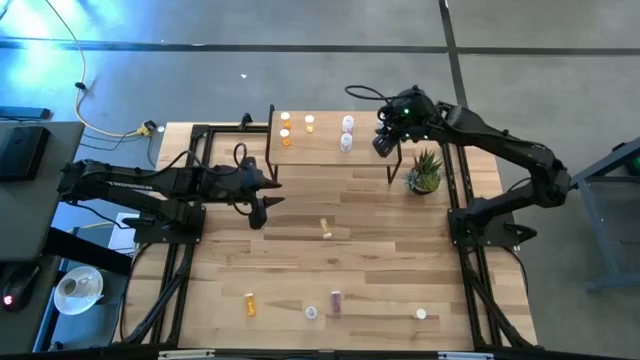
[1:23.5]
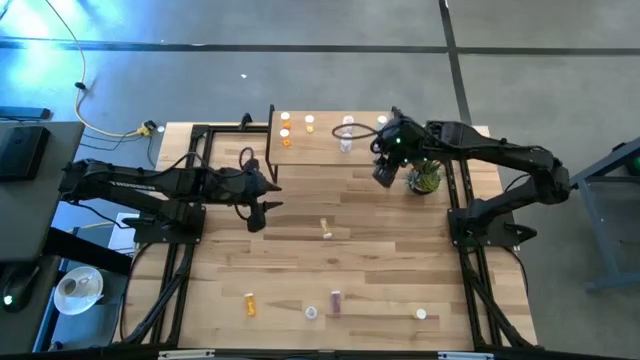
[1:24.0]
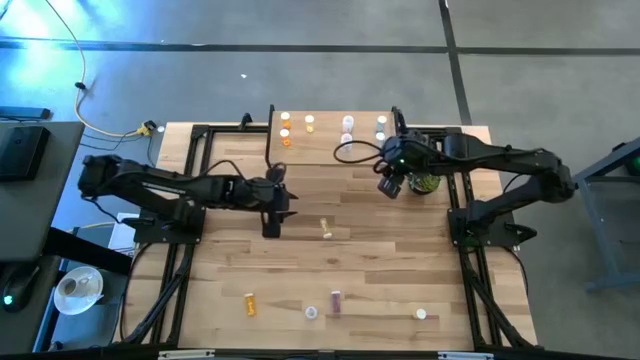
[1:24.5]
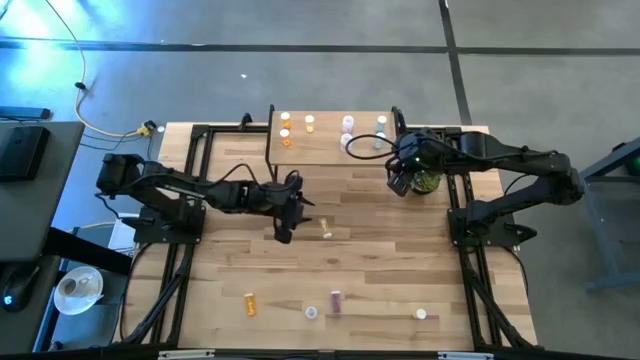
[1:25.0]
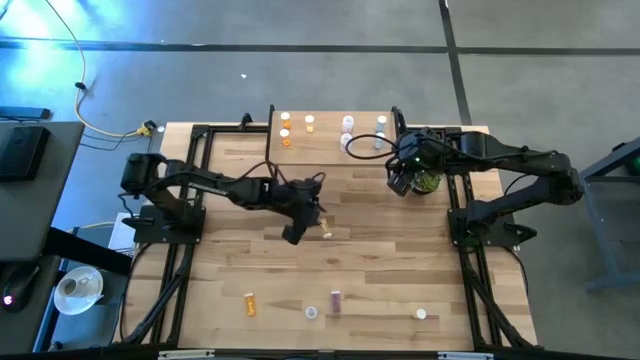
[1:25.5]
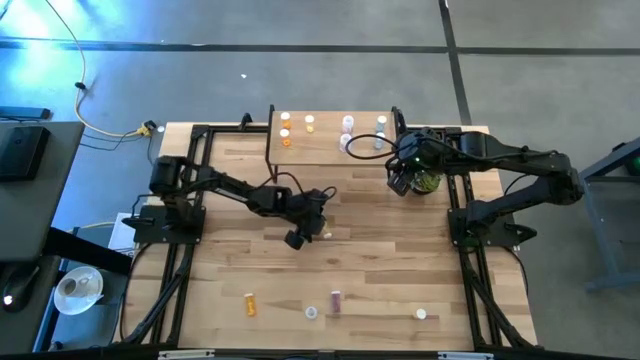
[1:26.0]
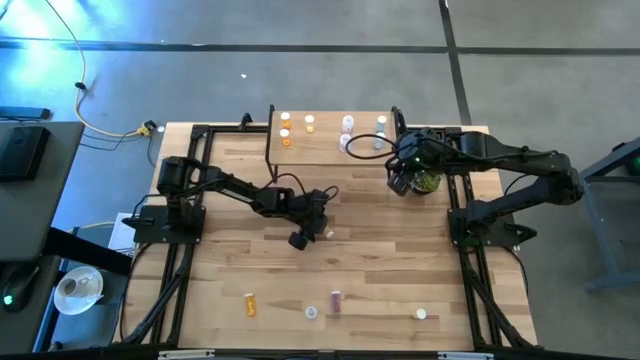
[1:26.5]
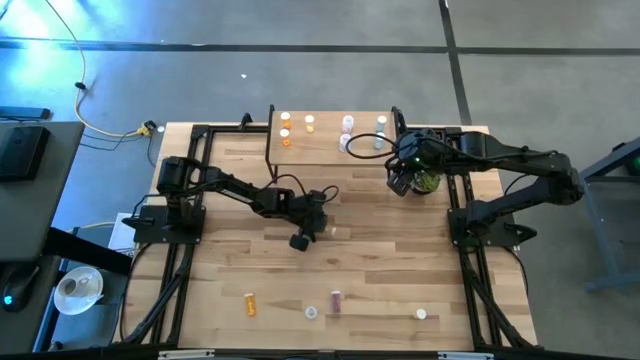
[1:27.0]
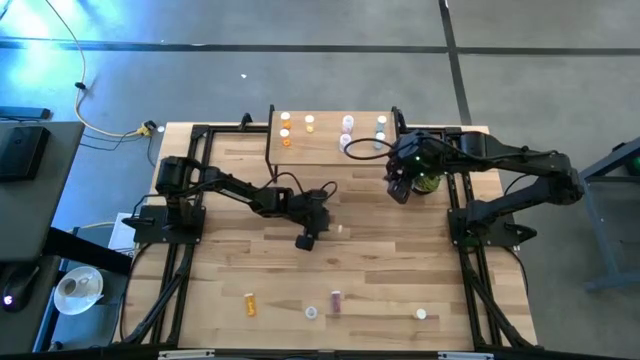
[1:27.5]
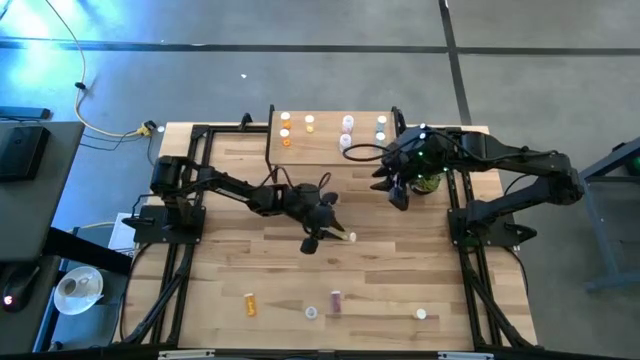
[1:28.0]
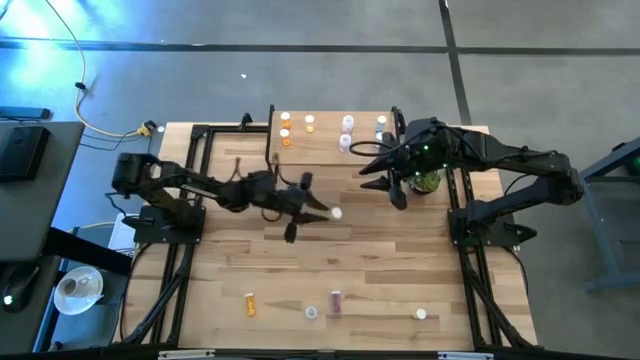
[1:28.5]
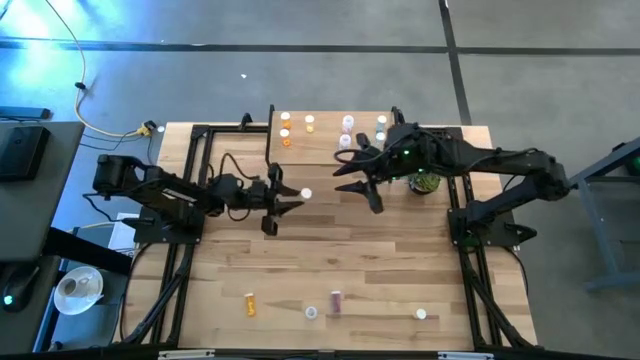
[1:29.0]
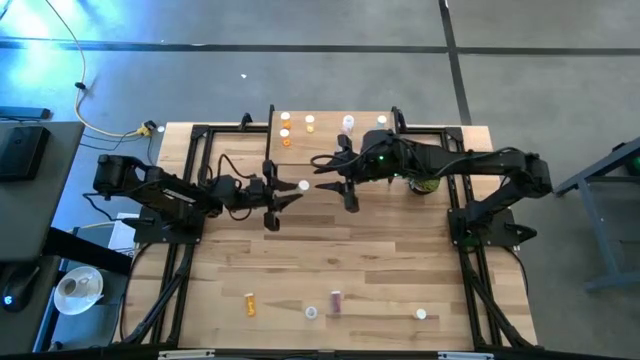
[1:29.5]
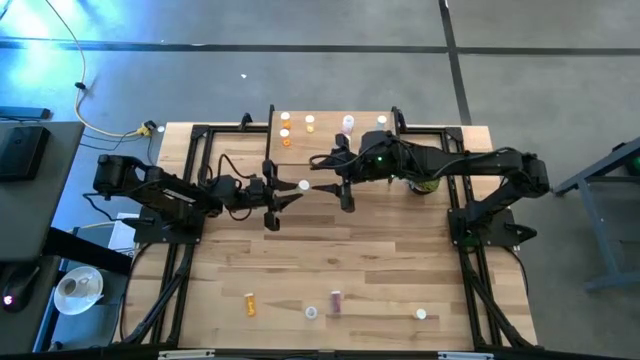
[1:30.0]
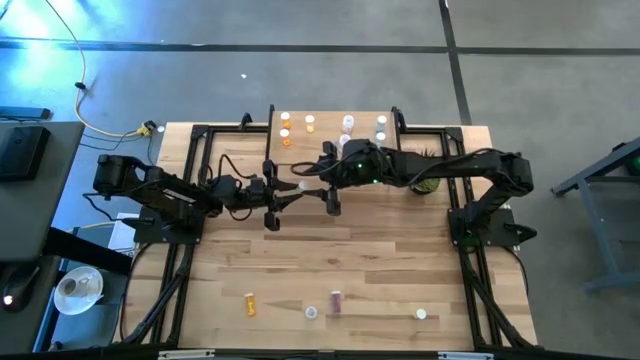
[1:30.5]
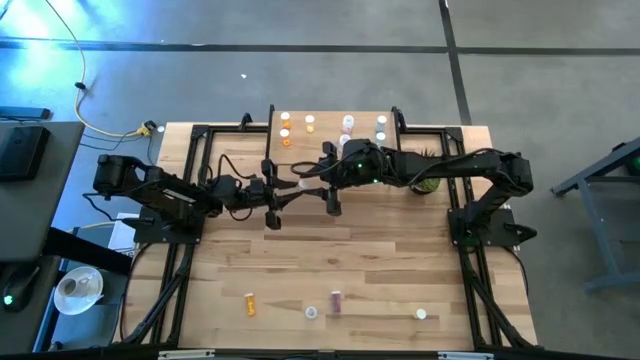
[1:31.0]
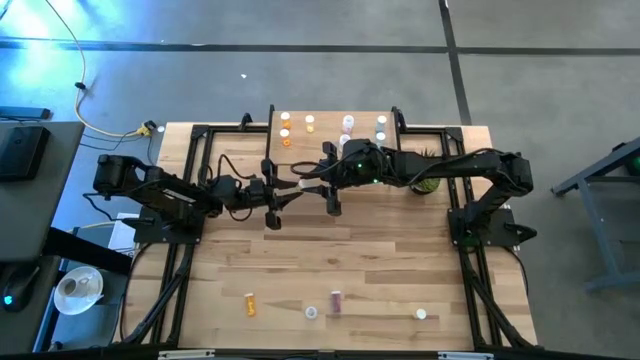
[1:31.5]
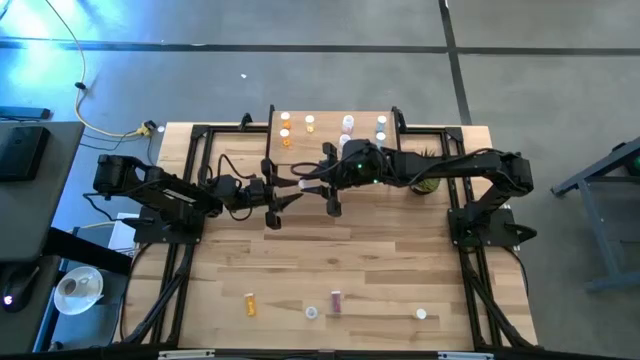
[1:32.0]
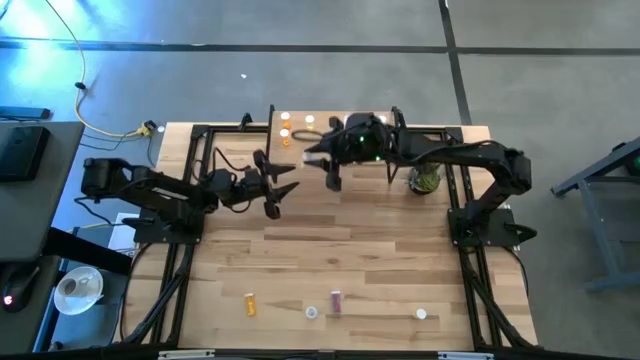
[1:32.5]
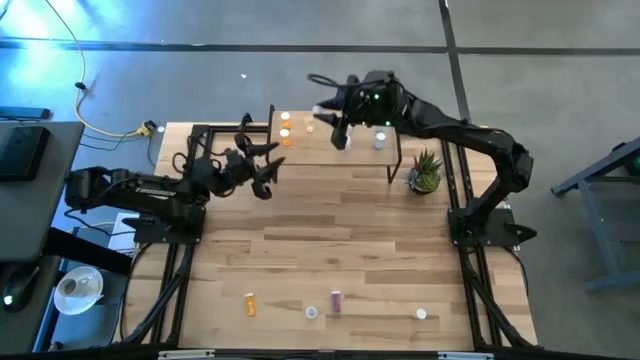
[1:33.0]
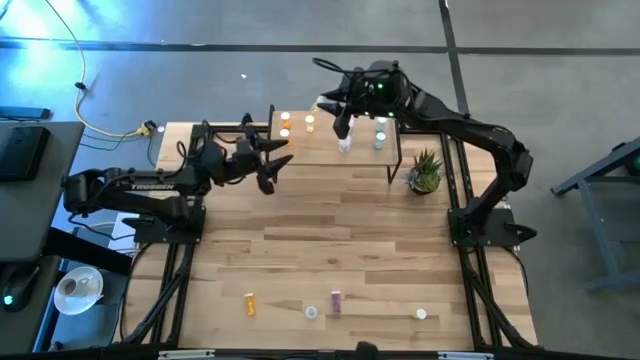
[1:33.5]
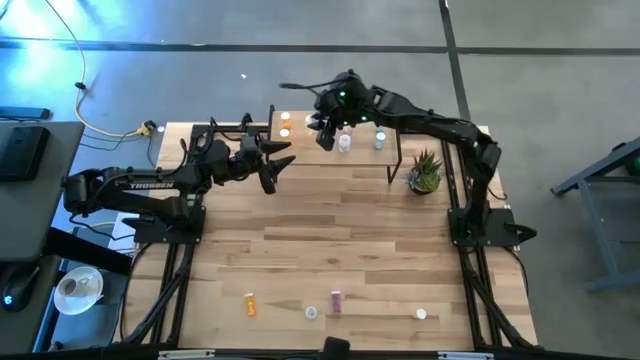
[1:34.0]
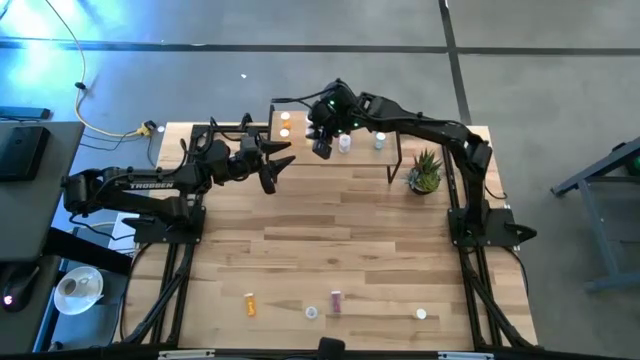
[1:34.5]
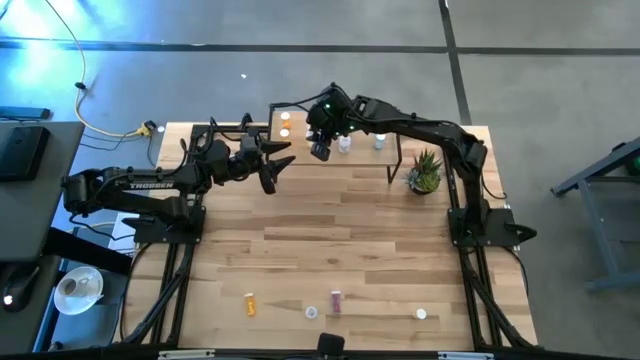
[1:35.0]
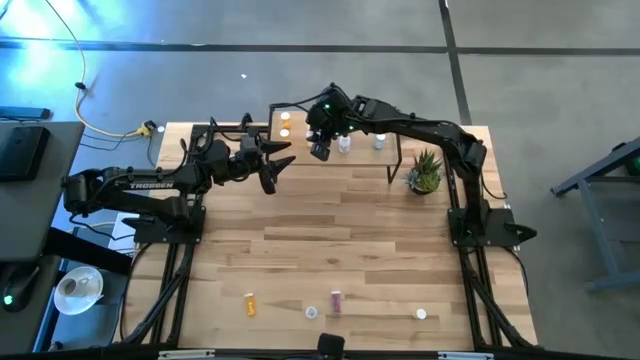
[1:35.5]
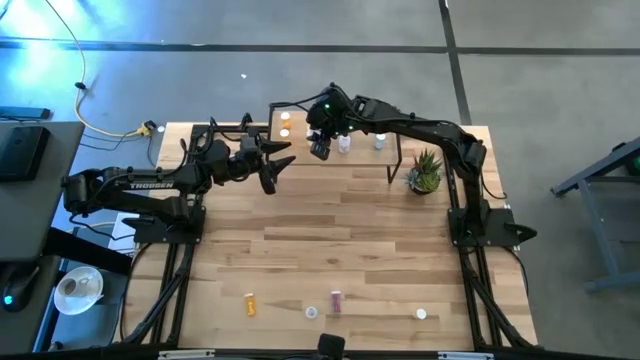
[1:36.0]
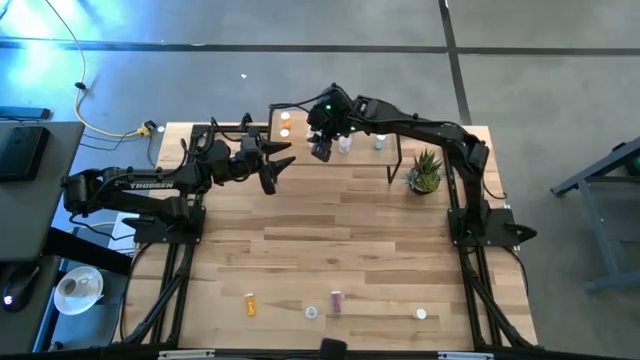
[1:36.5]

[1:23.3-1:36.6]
Task: Pick and place medicine bottles onto shelf by color
Put the top yellow pill bottle on the shelf aligned with the other yellow pill bottle

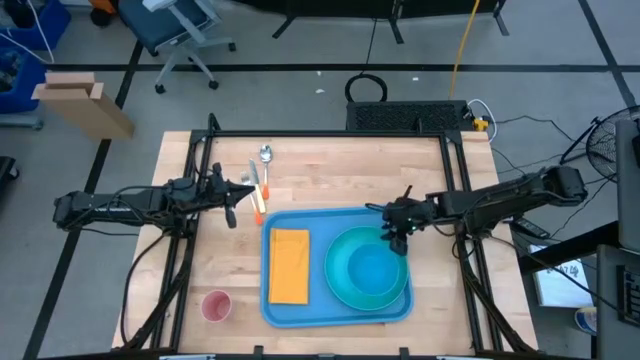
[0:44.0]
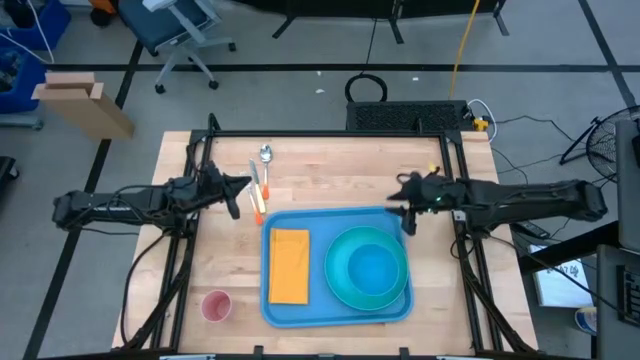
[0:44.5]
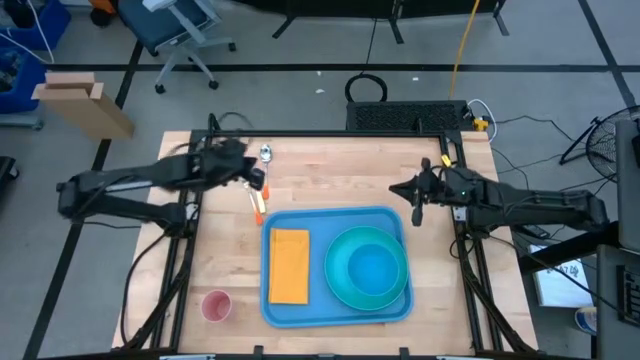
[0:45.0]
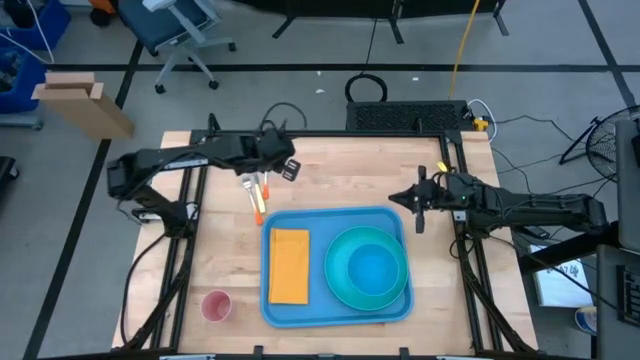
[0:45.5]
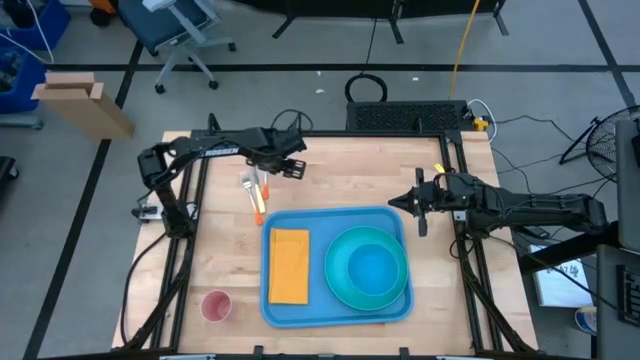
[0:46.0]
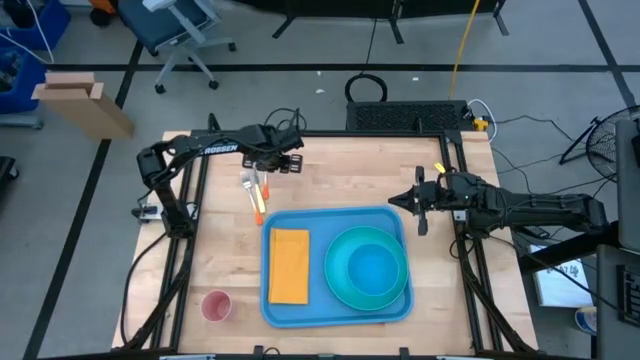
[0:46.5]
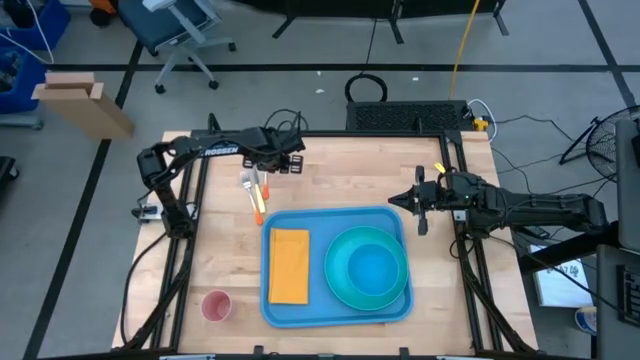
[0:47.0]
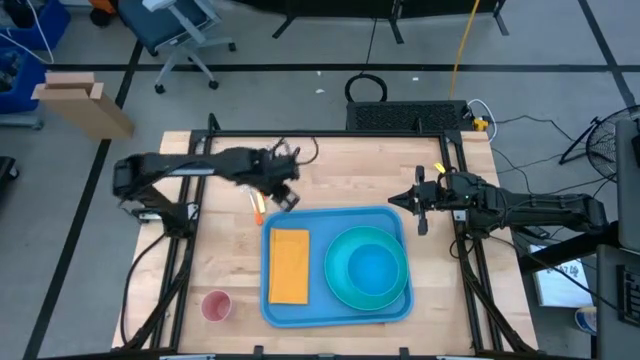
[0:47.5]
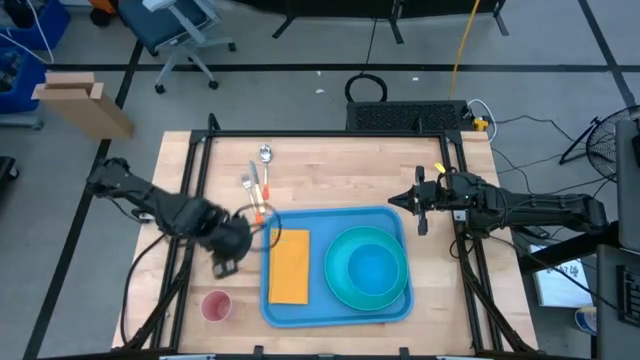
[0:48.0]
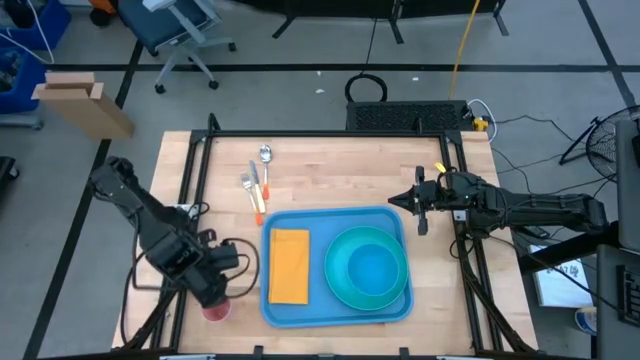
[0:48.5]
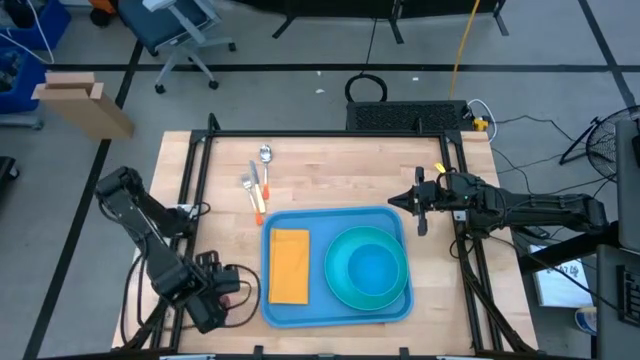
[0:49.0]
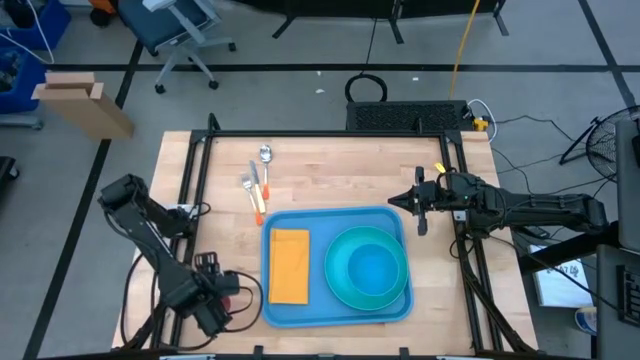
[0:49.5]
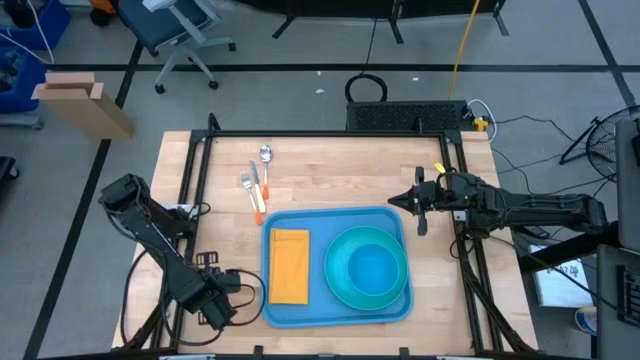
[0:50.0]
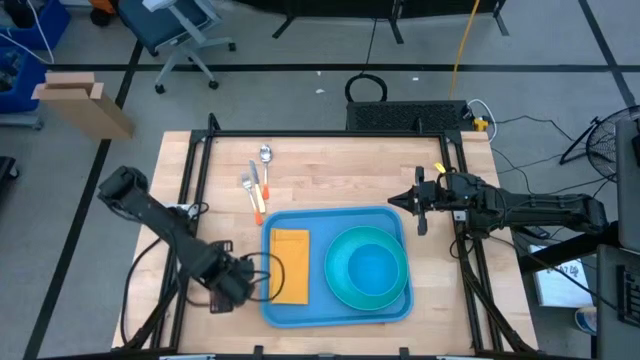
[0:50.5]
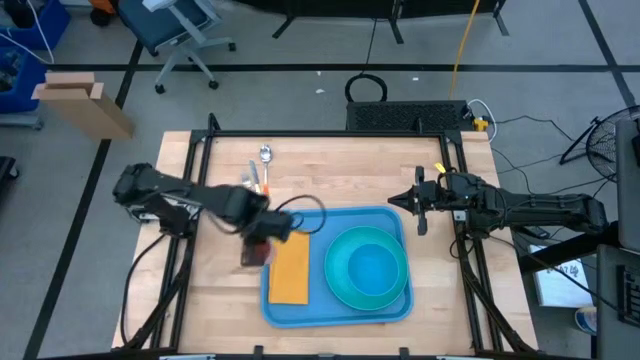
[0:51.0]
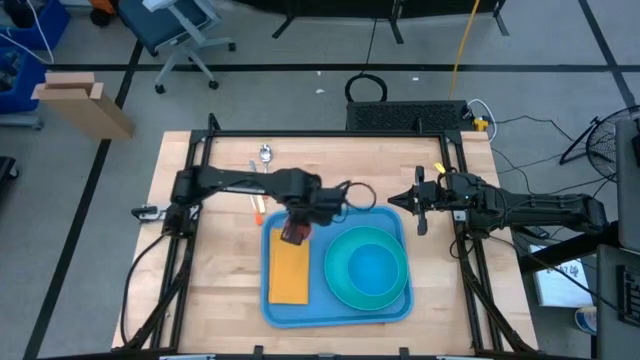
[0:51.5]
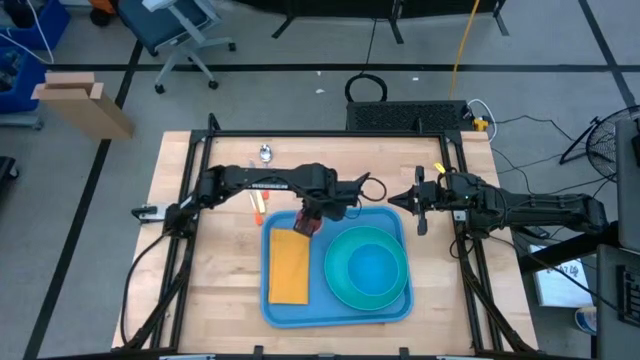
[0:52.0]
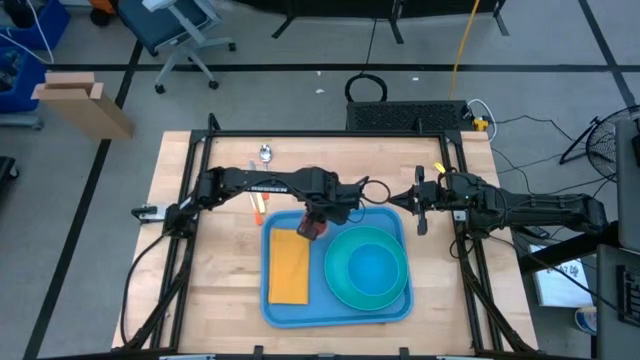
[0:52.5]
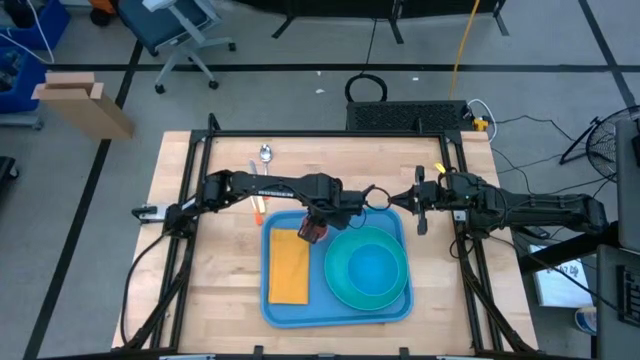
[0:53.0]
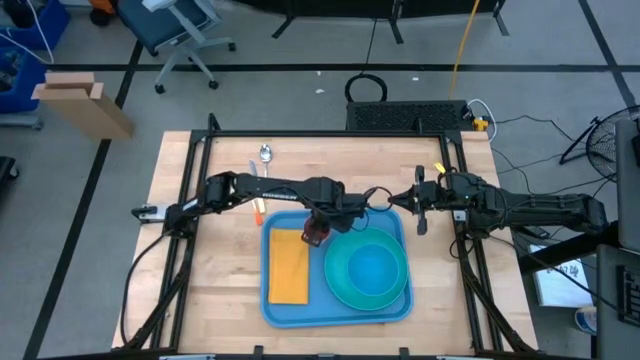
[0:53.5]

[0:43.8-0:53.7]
Task: Set up tray
Put the pink cup on the blue serving tray to the top left of the light green plate
